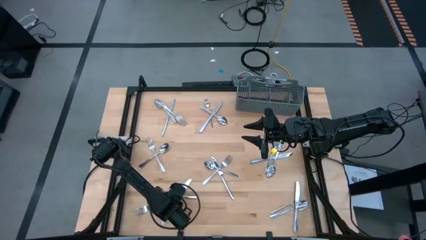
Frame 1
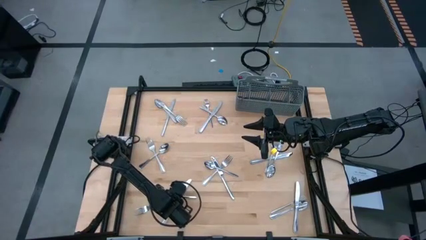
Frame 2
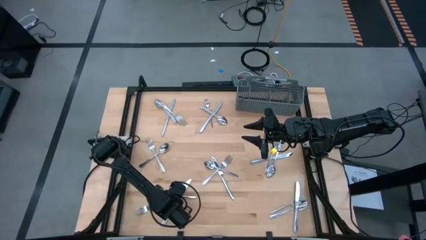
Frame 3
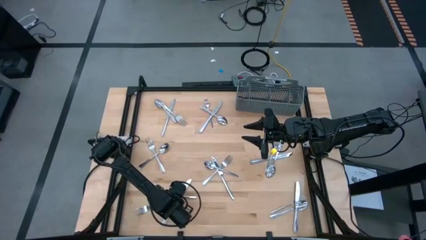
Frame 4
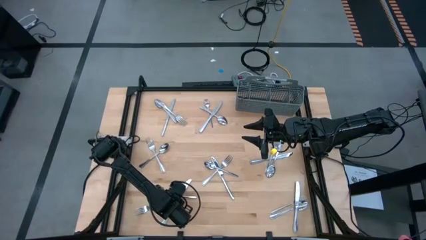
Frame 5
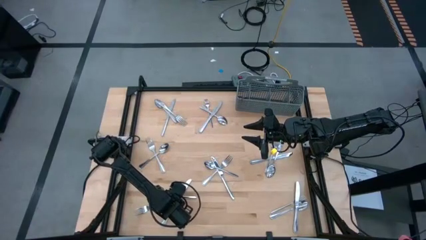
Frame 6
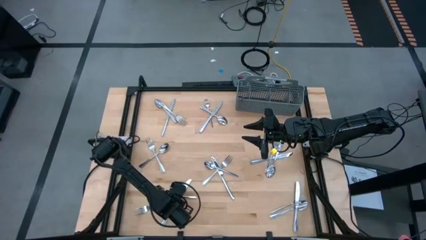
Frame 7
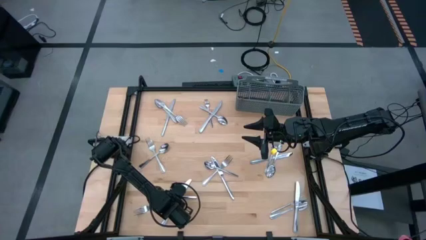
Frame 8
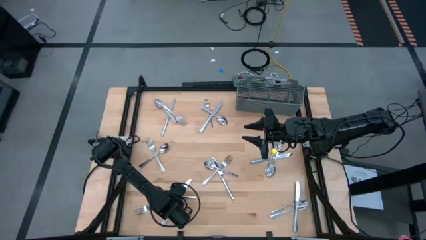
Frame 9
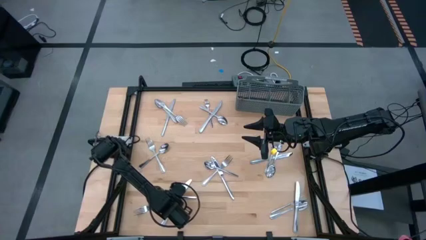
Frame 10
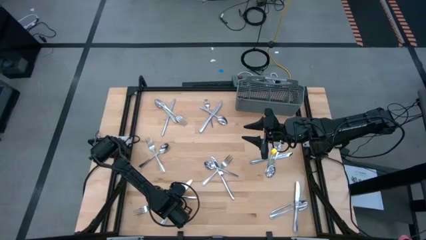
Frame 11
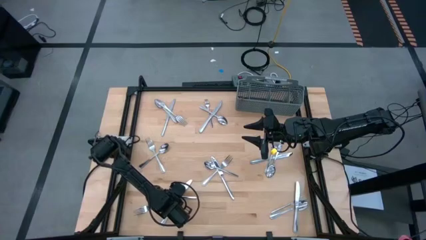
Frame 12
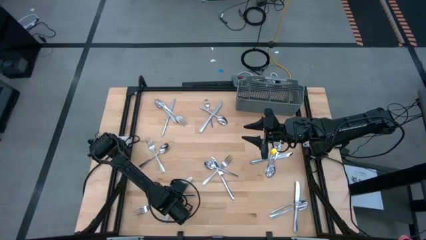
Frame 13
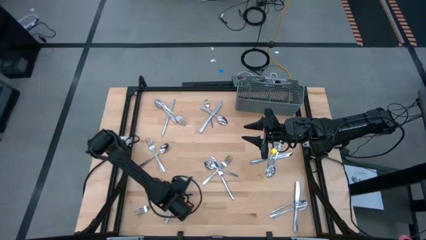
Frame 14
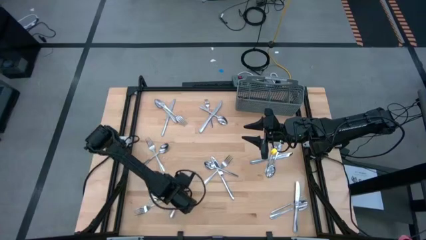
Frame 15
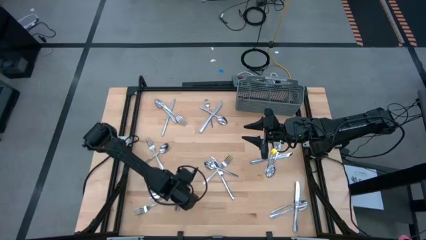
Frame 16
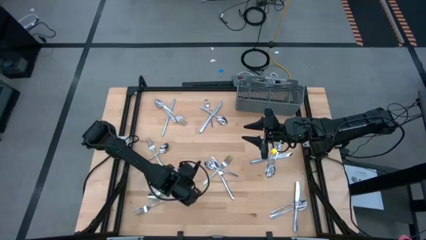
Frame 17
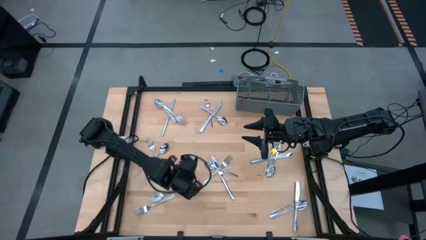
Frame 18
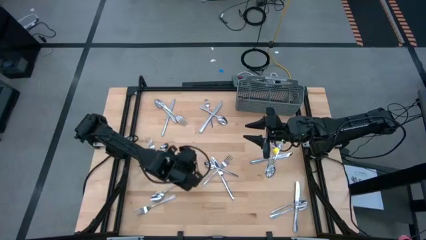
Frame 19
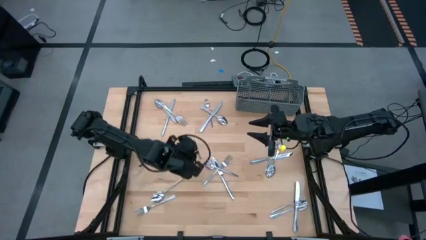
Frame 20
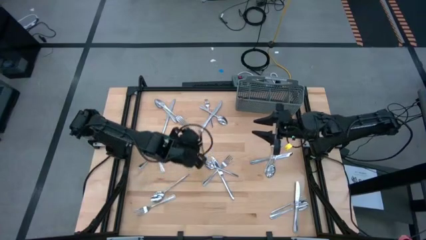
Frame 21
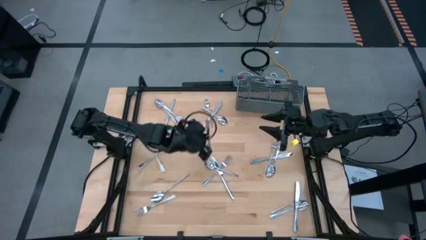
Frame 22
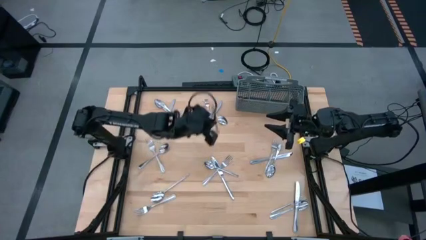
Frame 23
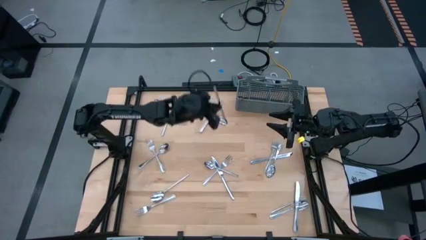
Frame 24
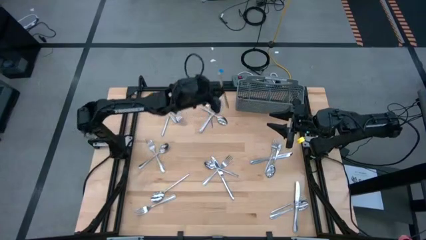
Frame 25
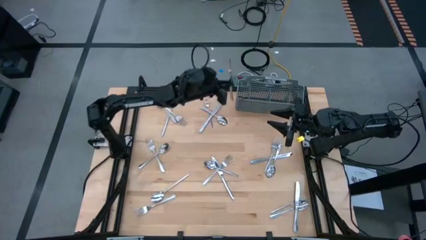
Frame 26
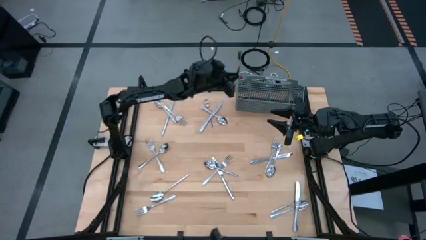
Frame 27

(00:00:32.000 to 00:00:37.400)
Task: Sort silverware
Put the silver knife into the silverware basket

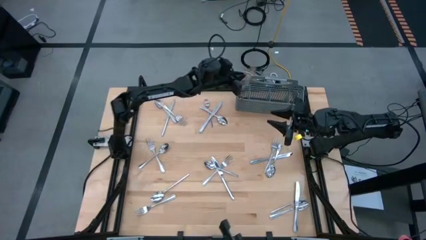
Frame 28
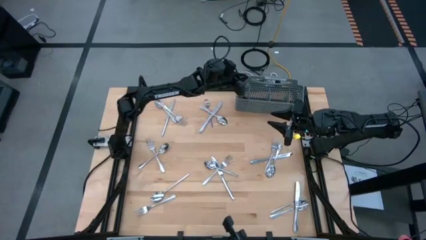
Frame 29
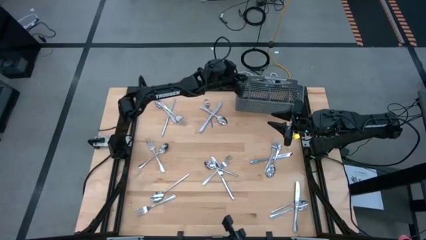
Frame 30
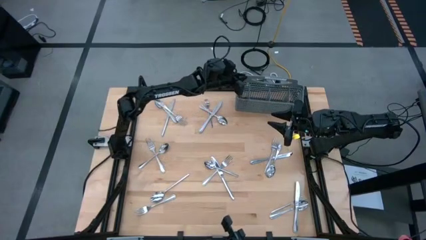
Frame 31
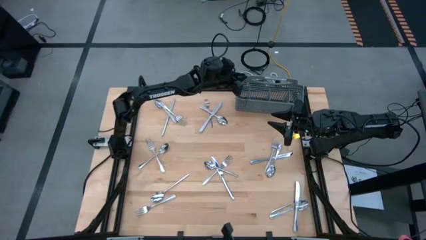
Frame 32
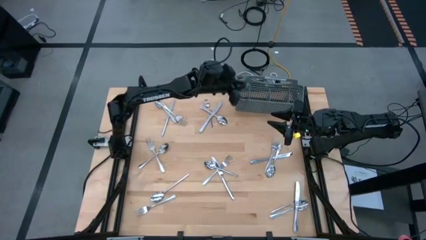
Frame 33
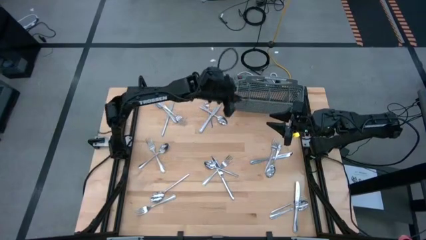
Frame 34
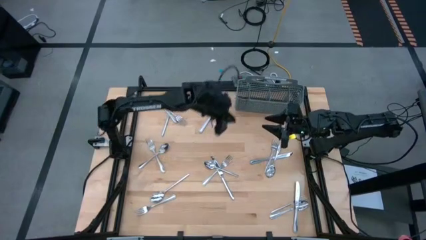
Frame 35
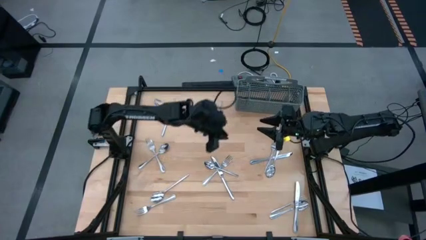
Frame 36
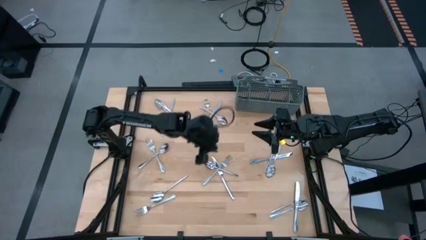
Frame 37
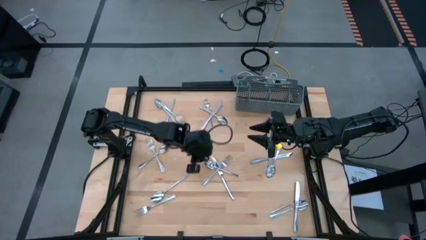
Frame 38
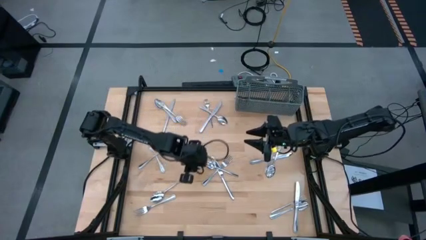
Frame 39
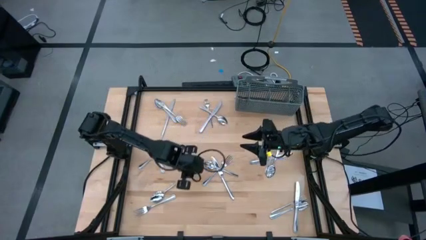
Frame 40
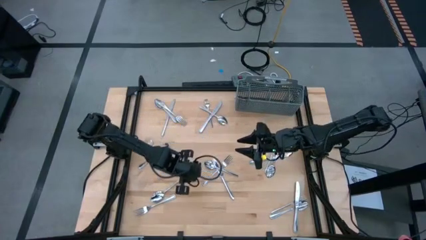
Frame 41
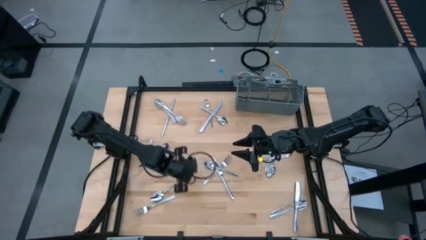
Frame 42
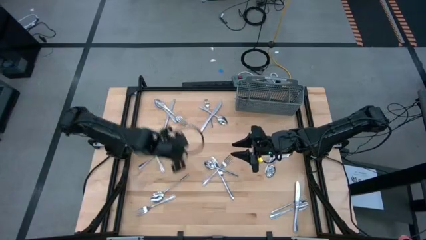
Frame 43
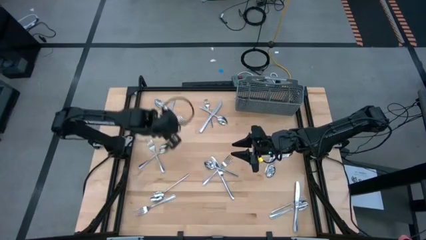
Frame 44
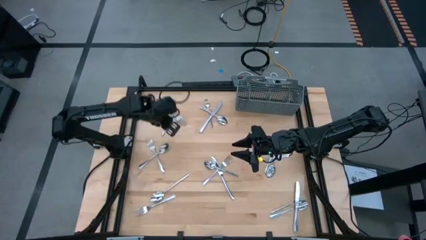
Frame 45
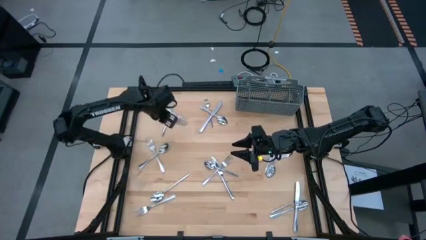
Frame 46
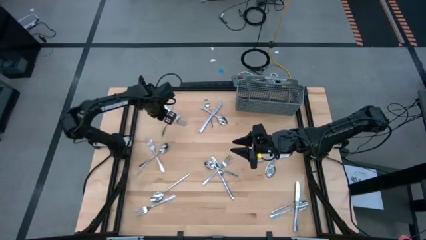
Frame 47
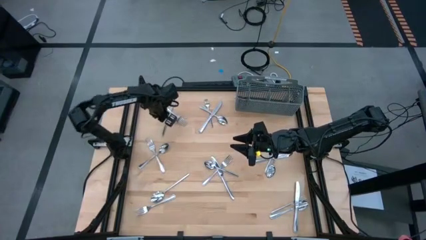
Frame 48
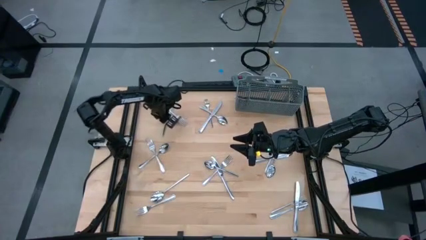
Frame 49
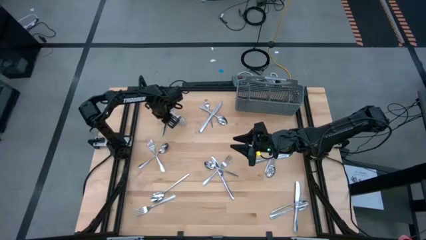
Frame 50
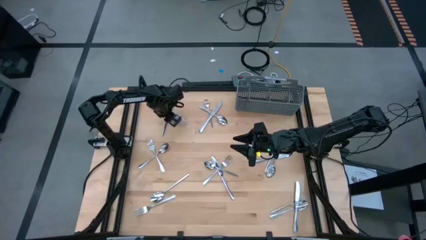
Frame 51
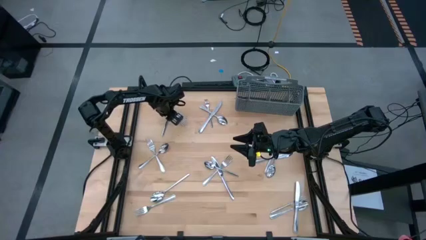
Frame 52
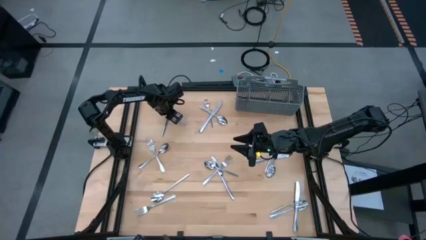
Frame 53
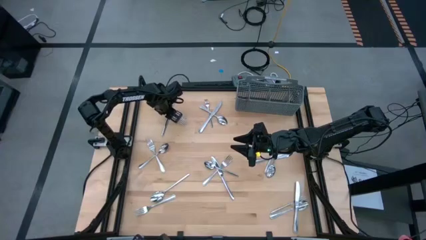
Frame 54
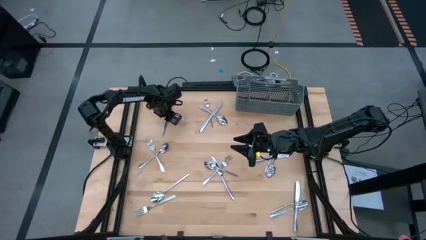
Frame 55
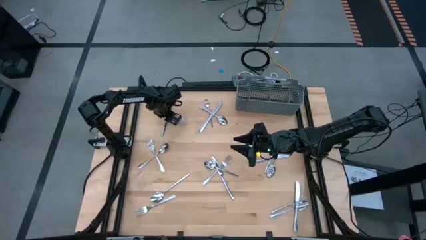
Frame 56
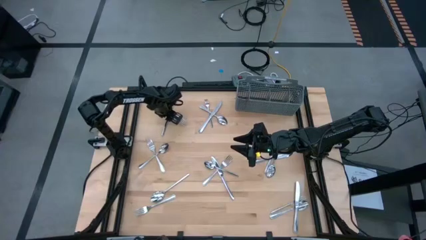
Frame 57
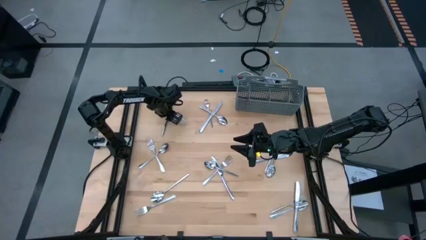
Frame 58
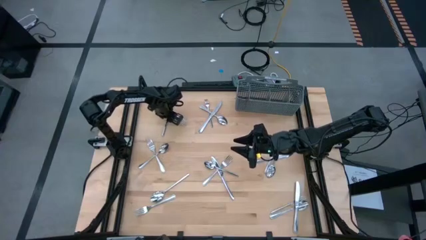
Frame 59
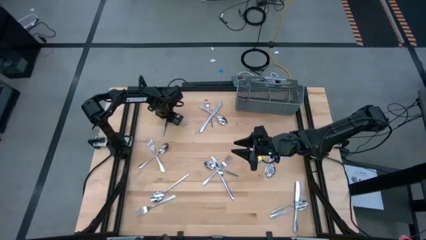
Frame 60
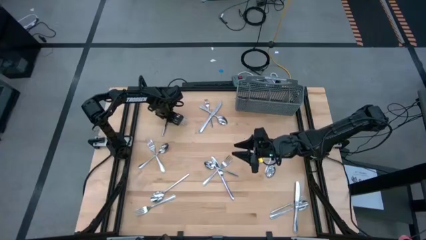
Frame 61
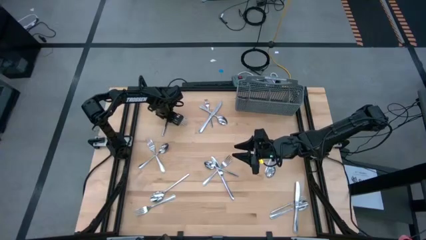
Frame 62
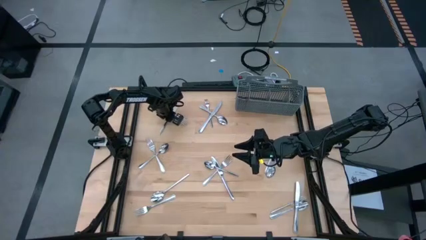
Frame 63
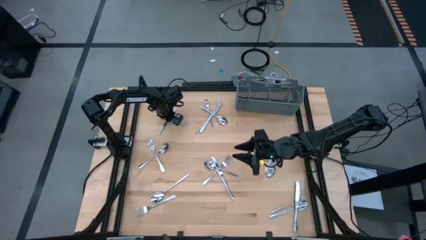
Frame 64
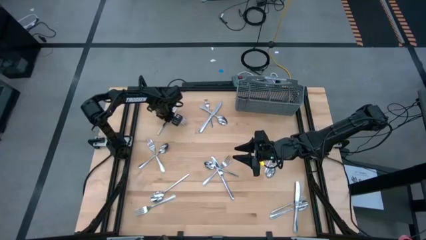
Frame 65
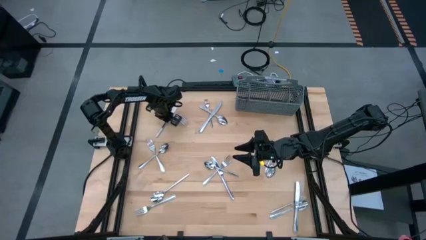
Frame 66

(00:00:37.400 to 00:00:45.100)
Put the silver knife into the silverware basket
